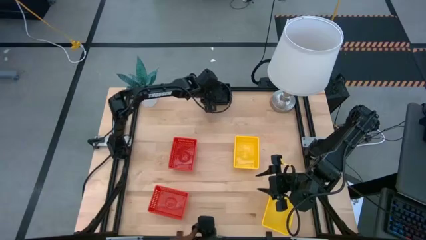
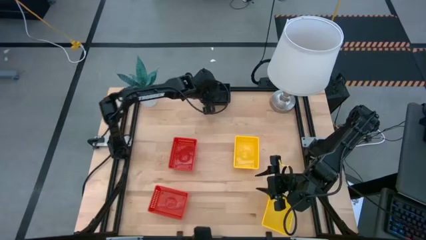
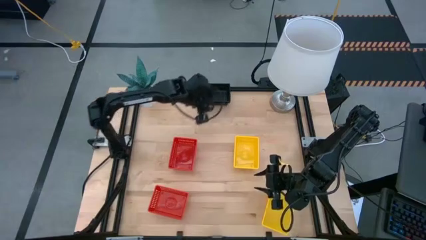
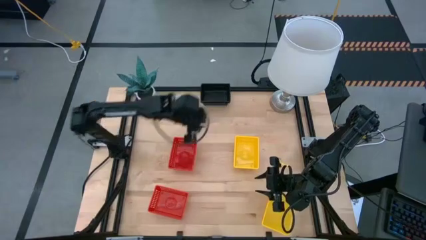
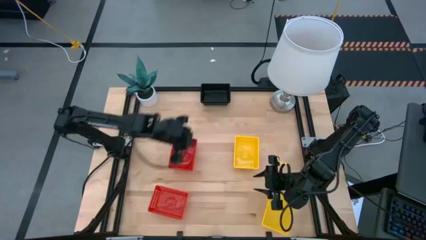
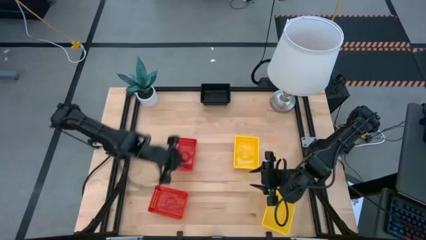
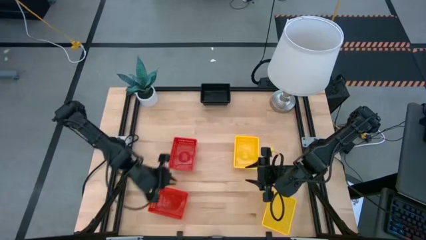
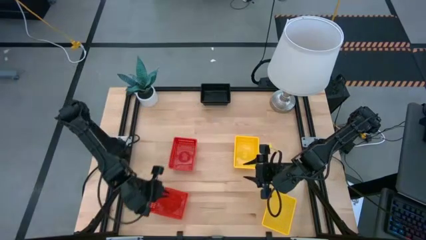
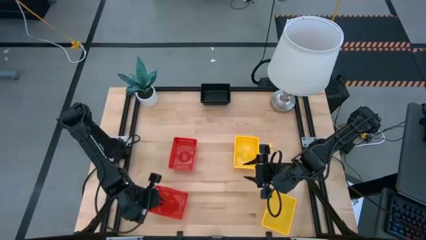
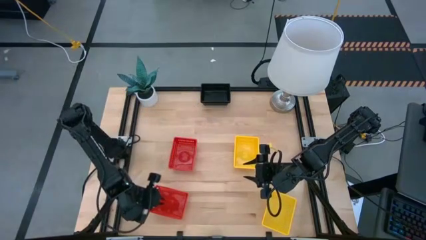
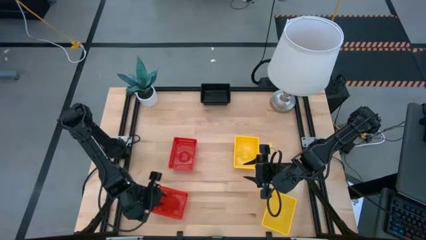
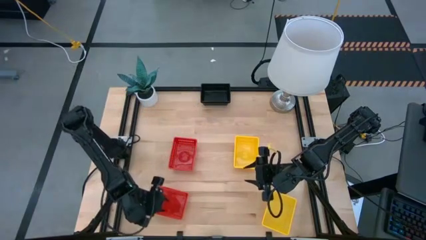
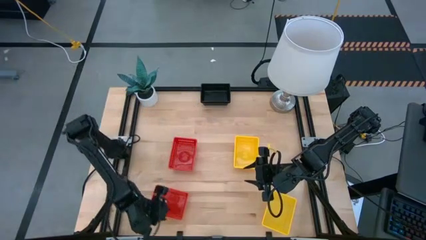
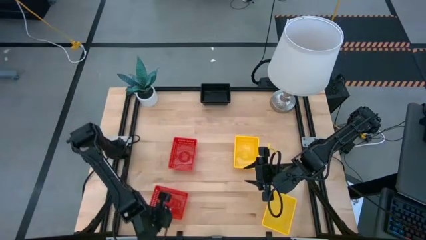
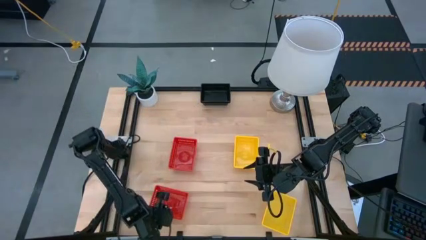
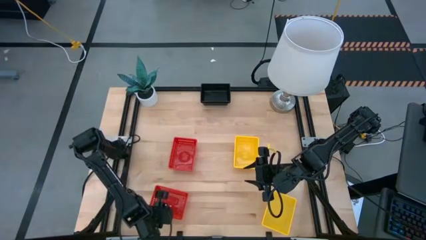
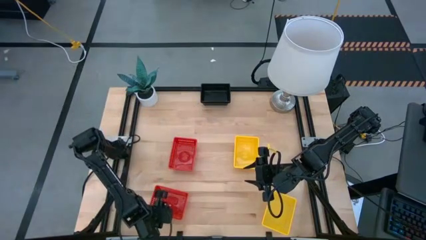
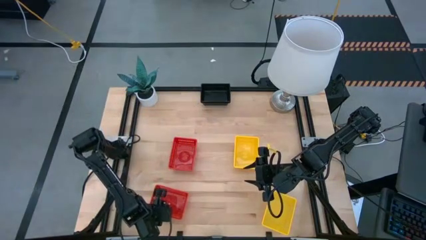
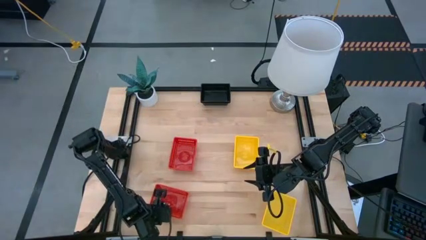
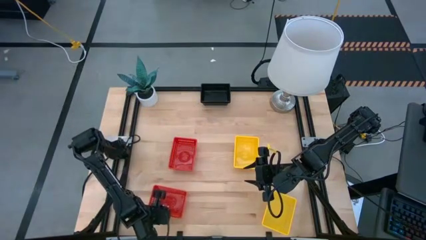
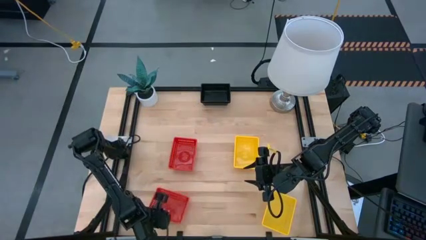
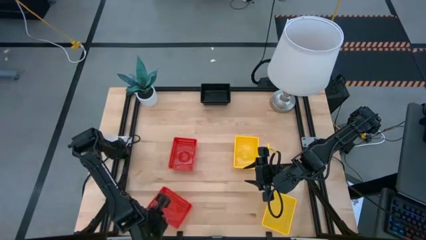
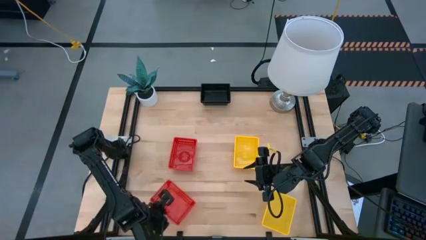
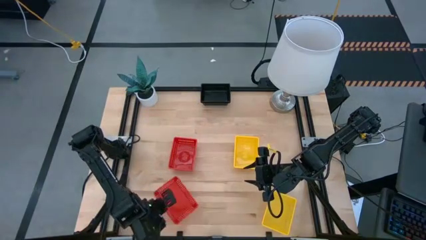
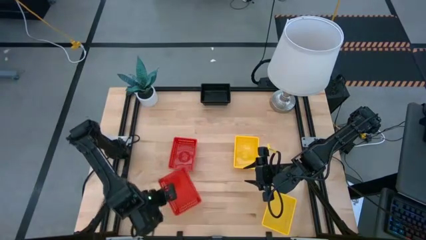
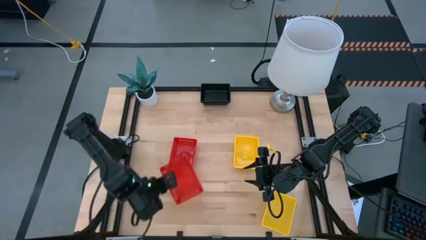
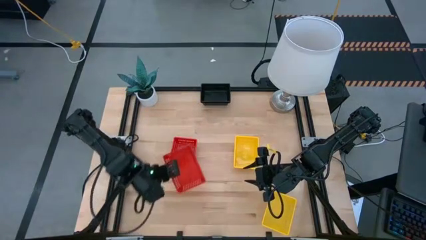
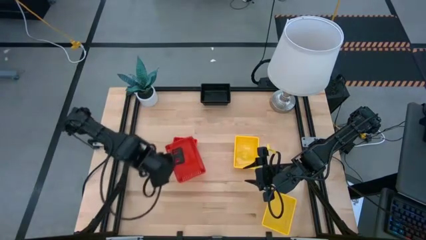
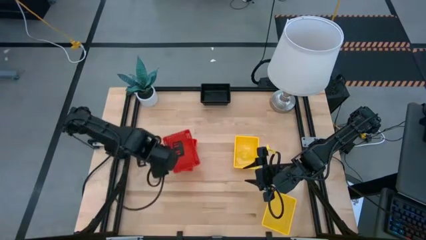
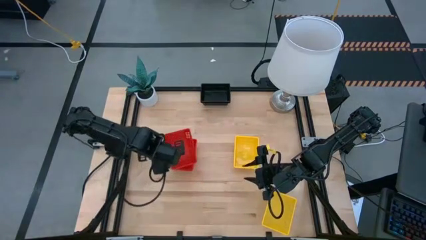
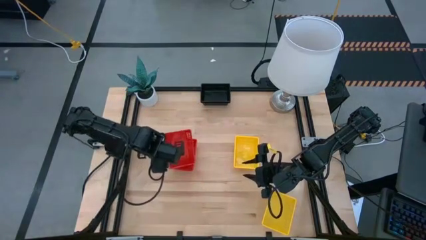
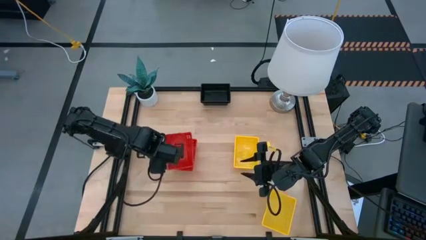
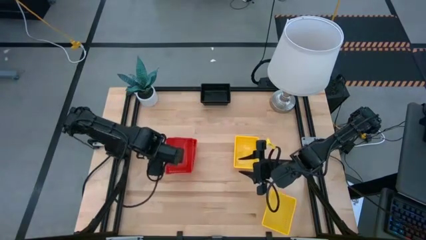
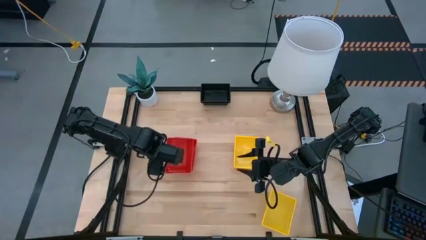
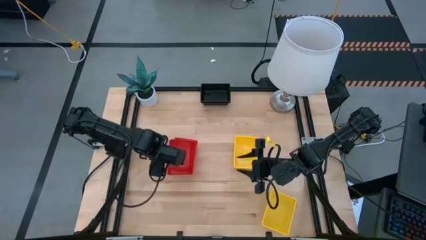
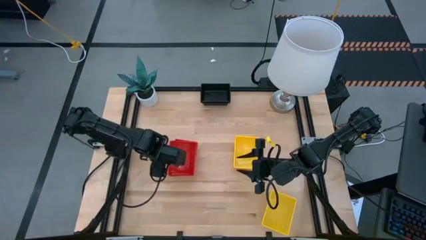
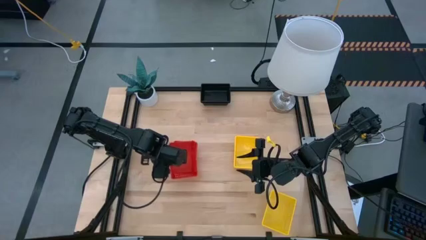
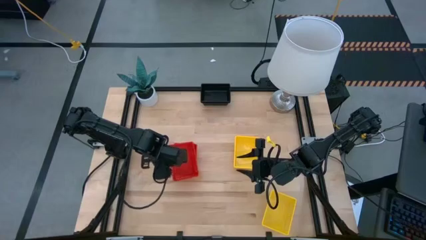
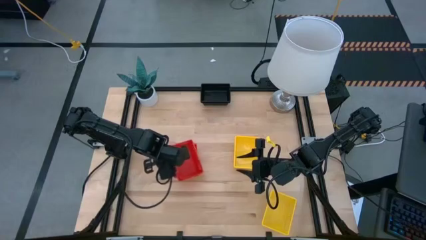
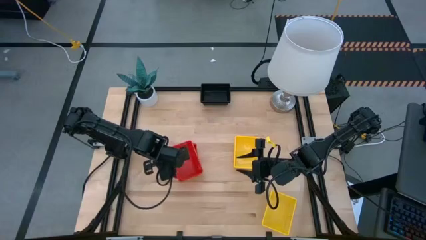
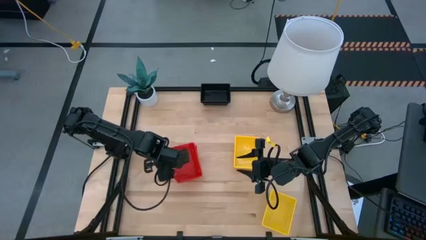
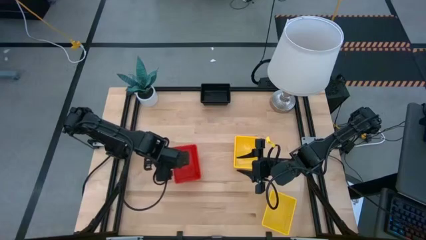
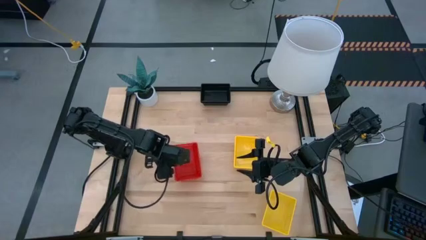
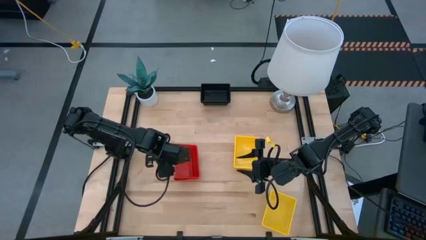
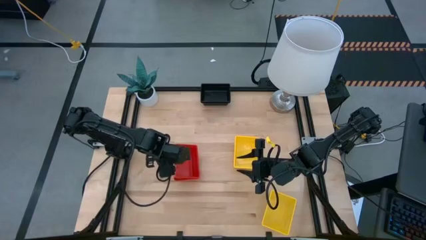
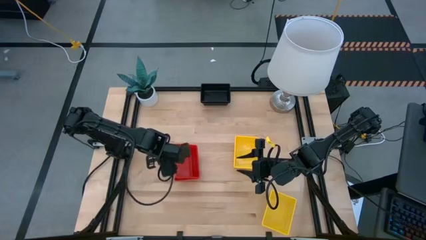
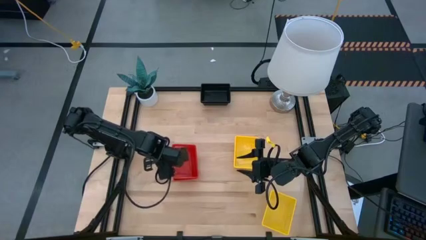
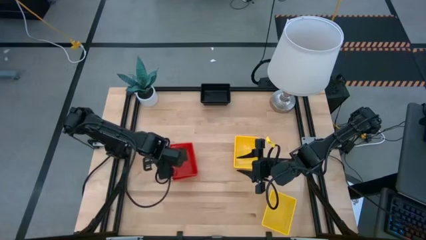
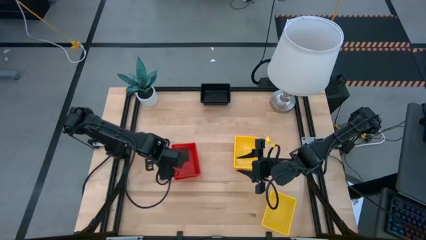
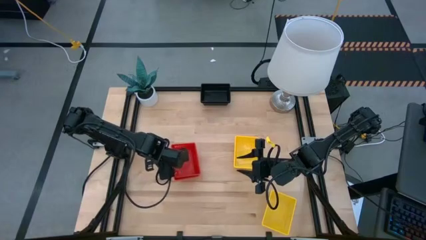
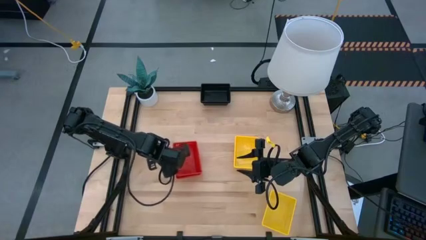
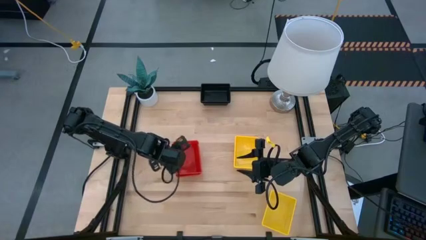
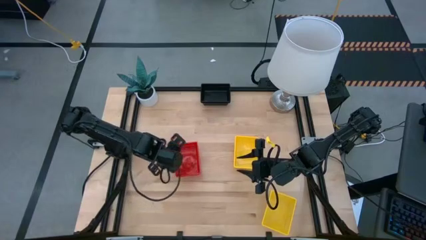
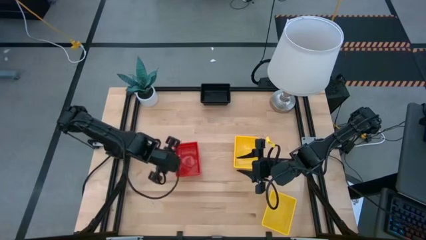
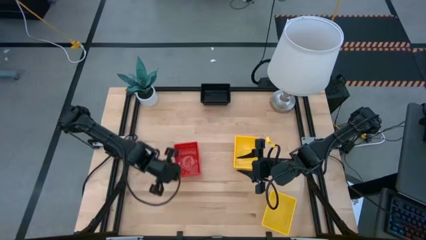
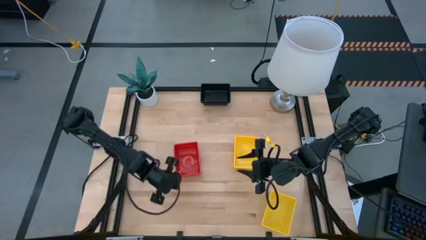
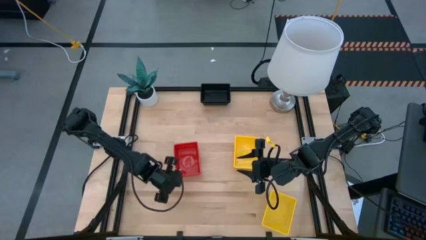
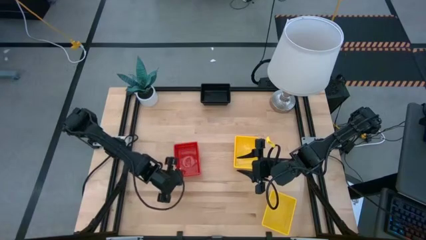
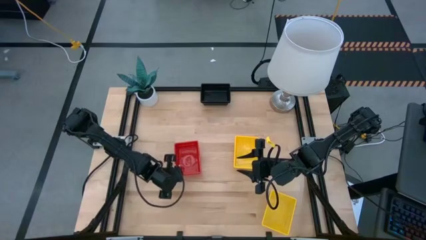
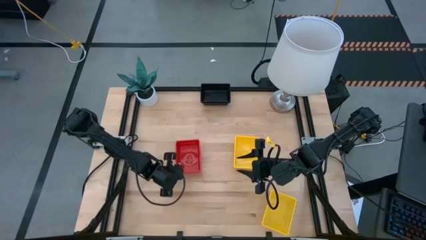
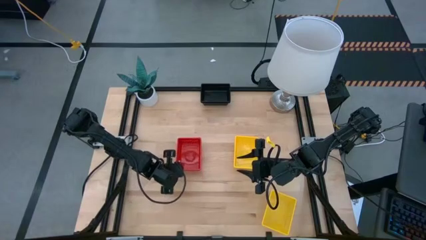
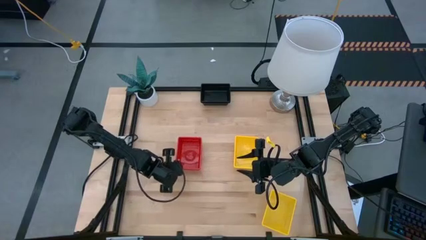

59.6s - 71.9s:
Stack the bottom red basket on the stacked top red baskets
